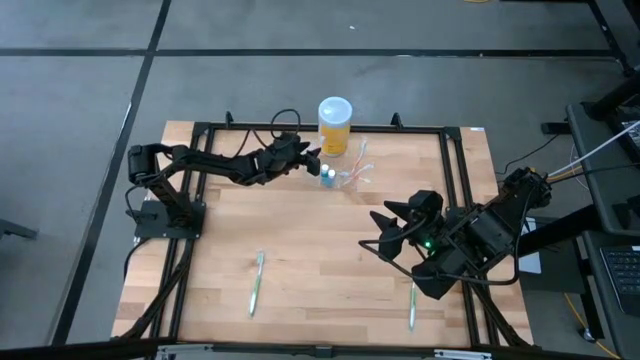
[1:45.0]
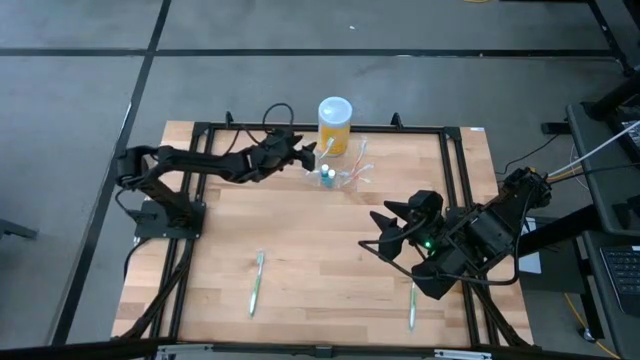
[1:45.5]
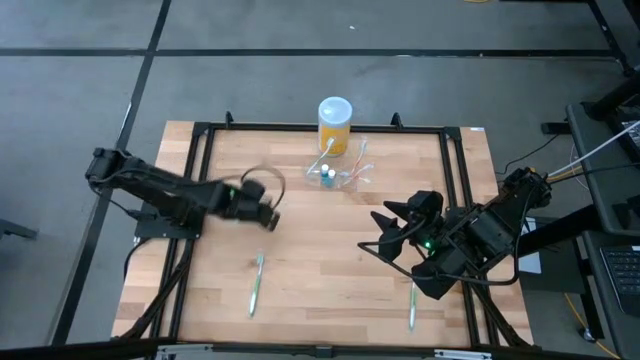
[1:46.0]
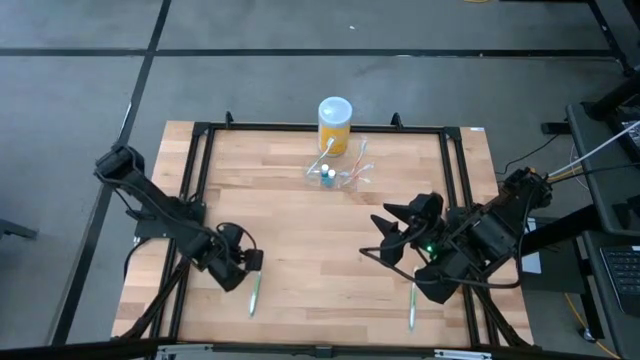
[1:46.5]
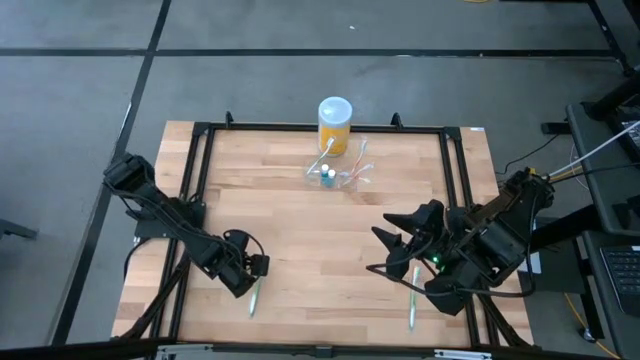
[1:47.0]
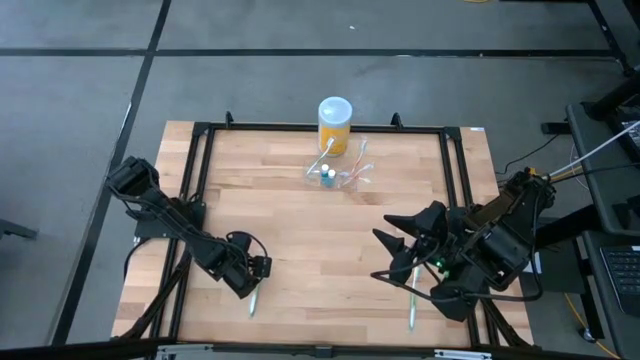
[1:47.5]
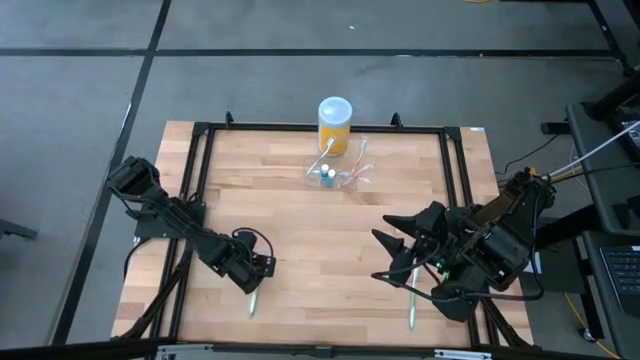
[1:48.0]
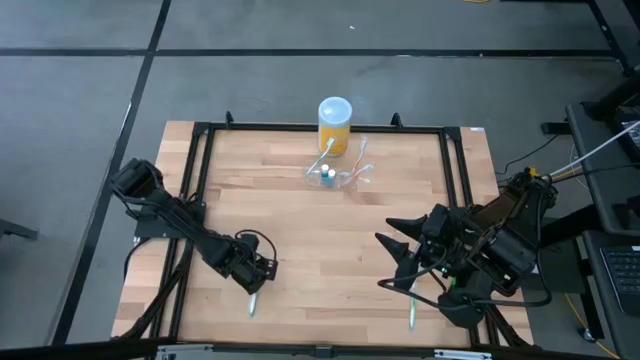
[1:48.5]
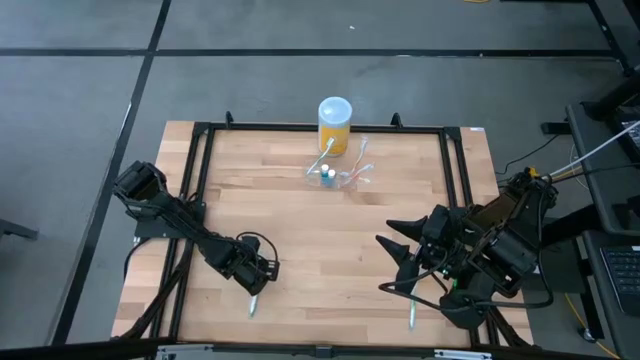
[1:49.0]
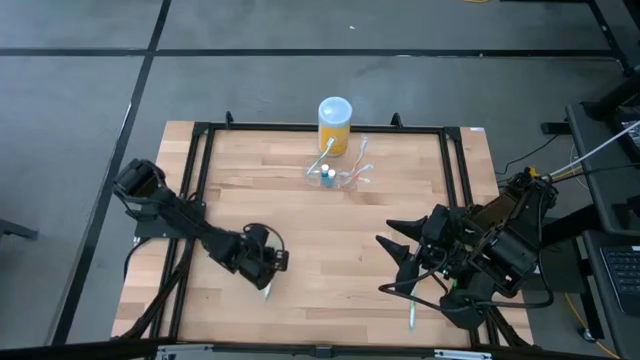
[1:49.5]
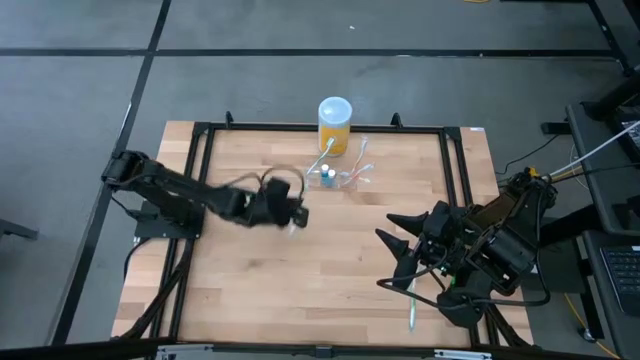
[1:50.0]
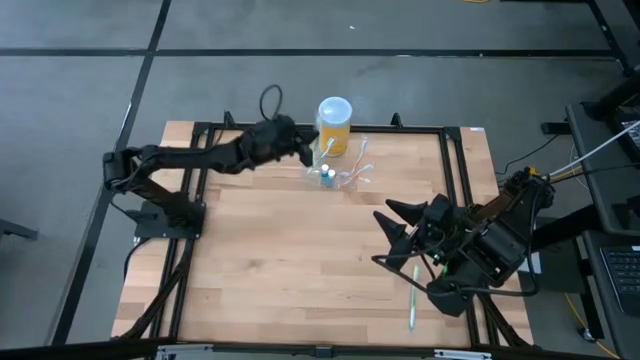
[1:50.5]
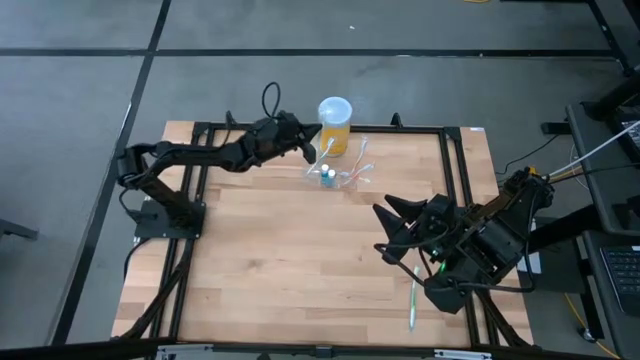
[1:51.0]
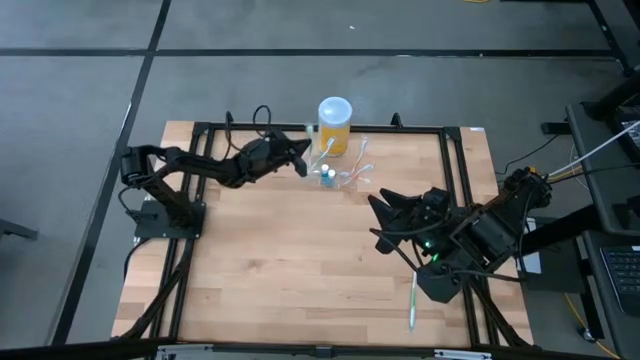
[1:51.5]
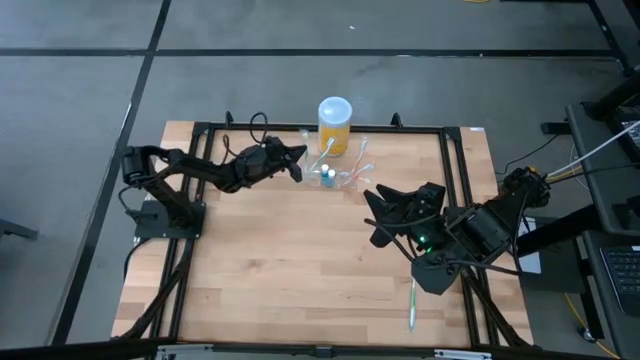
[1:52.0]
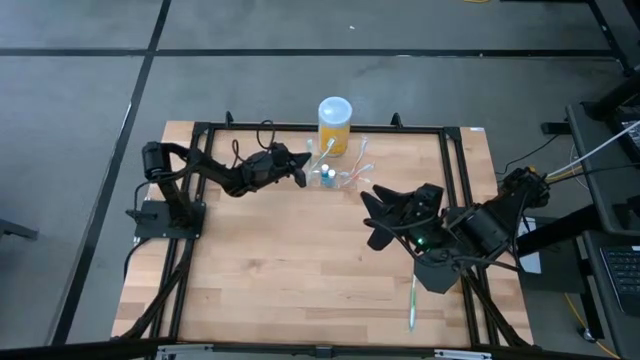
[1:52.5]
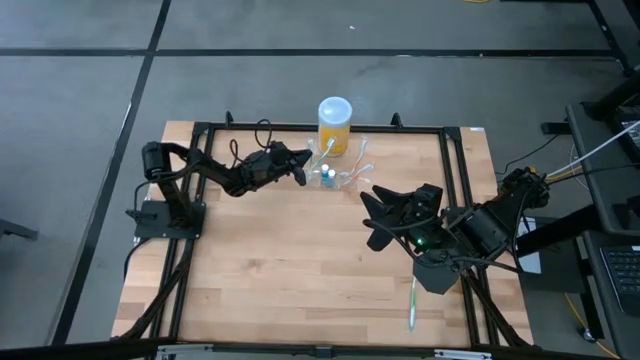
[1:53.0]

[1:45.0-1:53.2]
Task: Pick & Place toothbrushing station
Put the left green toothbrush into the transparent organizer

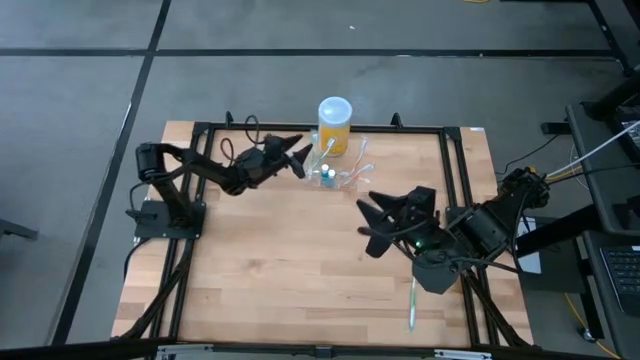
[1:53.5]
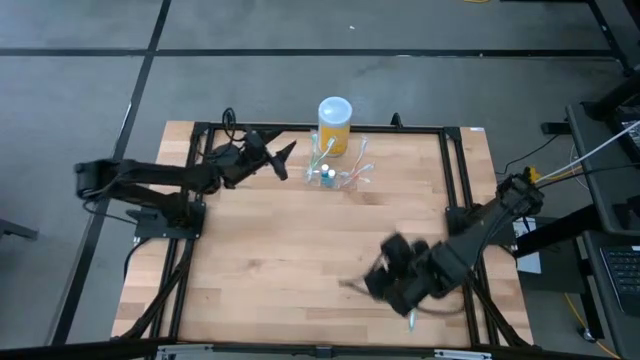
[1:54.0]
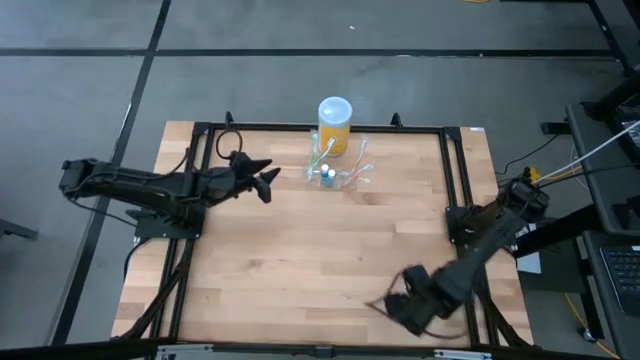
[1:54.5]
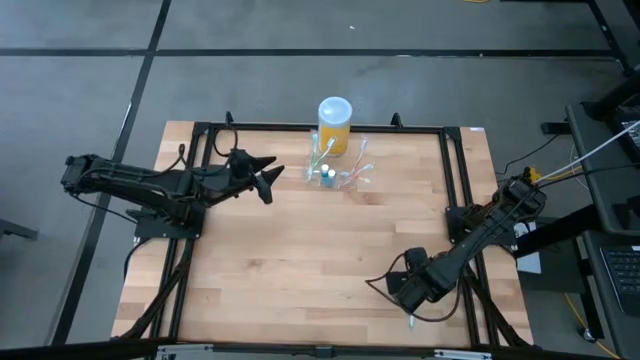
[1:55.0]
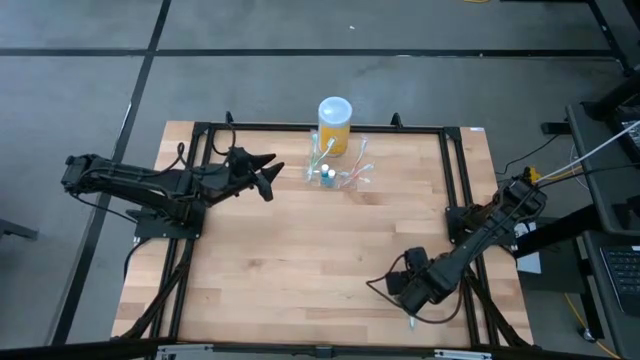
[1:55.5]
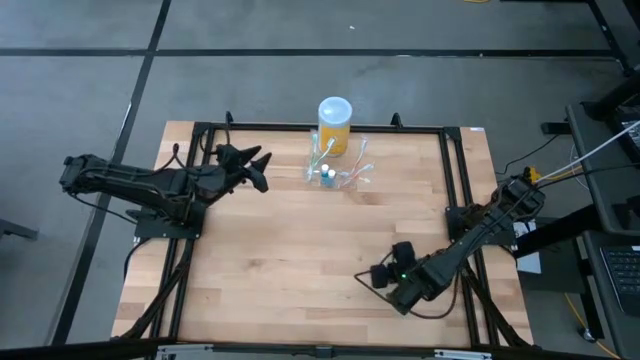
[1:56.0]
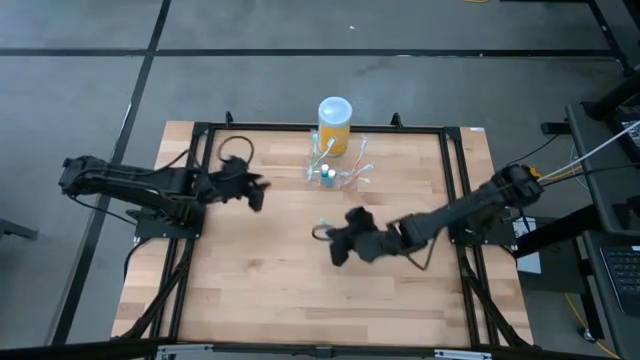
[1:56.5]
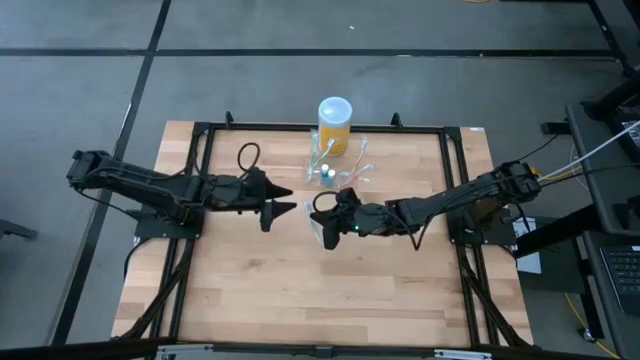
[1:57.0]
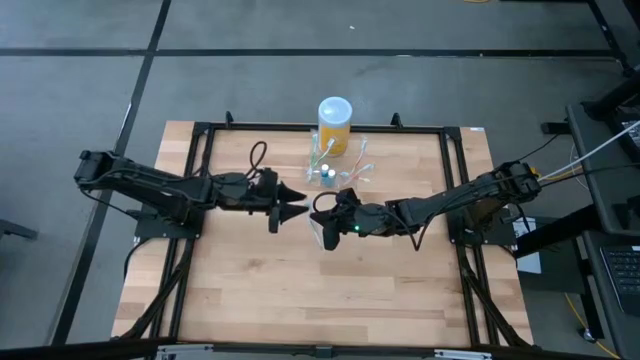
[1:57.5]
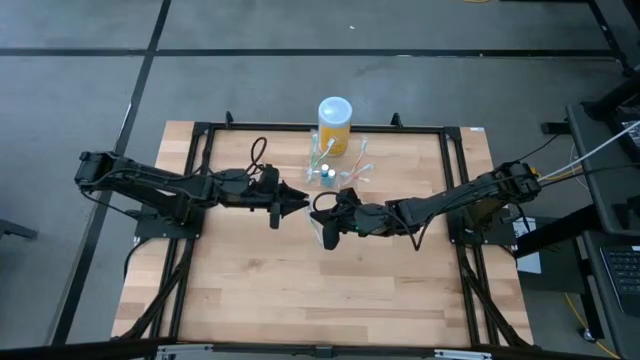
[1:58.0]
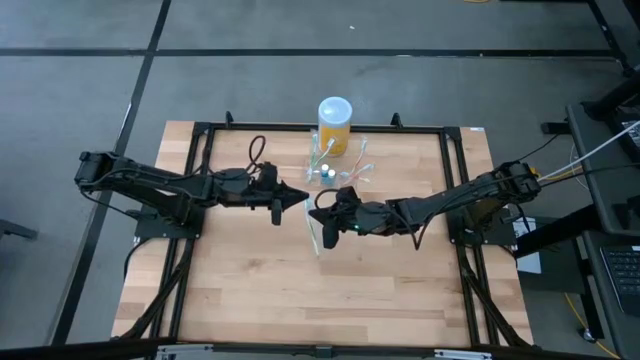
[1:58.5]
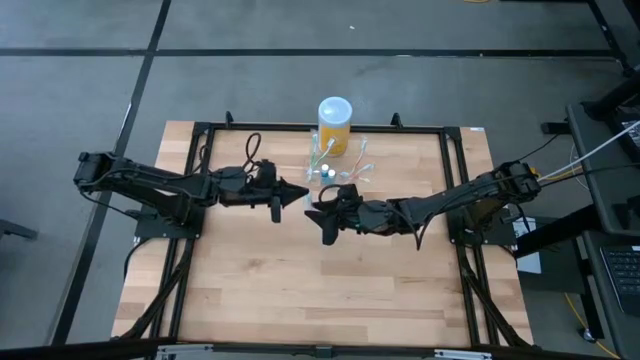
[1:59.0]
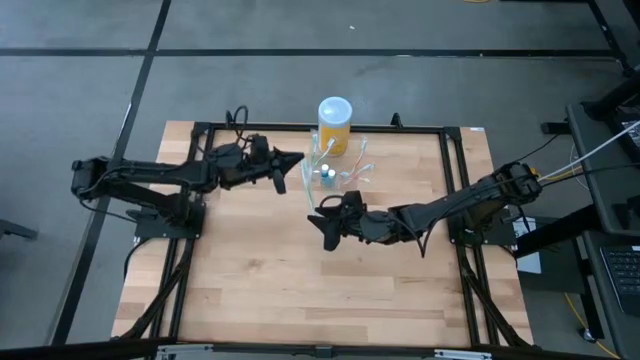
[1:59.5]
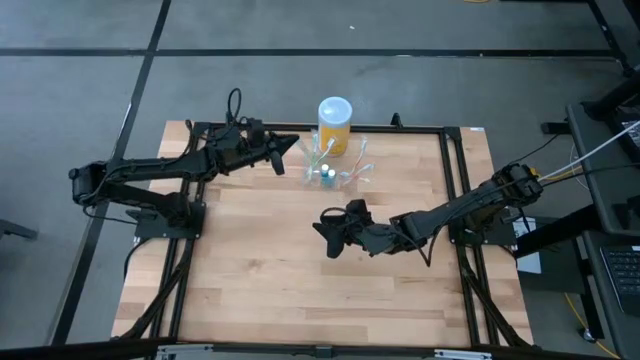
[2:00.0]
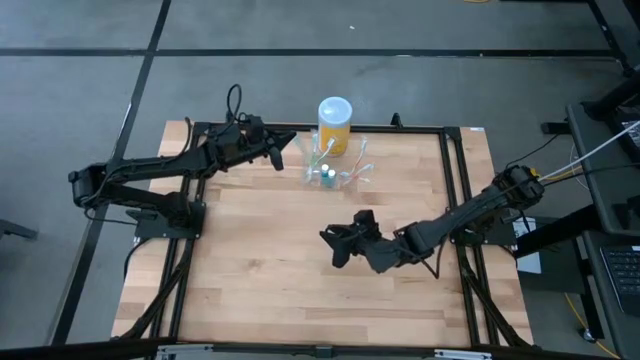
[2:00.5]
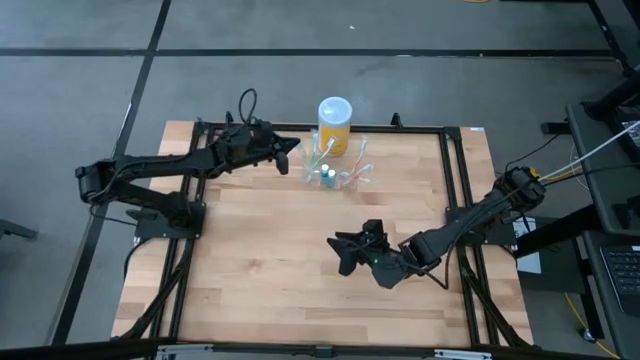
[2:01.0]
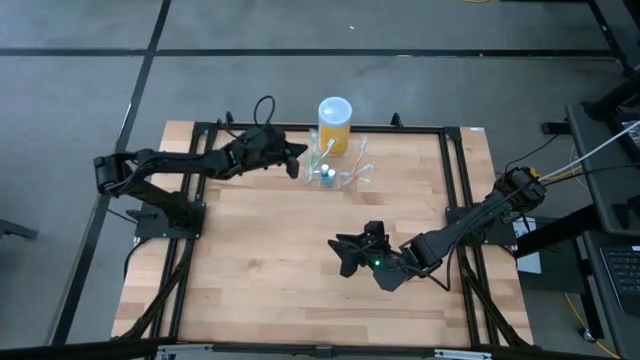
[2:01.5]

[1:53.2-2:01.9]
Put the green toothbrush into the transparent organizer
